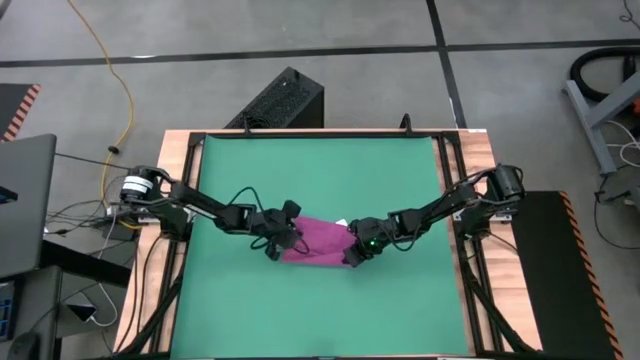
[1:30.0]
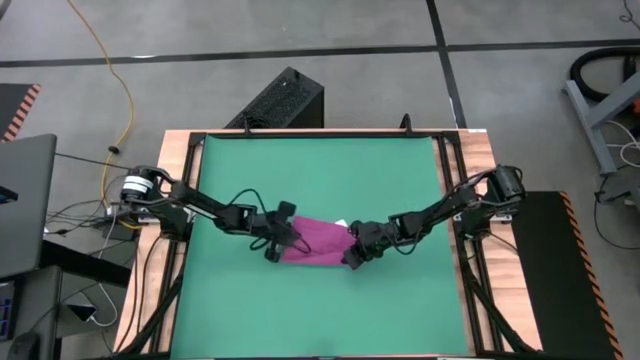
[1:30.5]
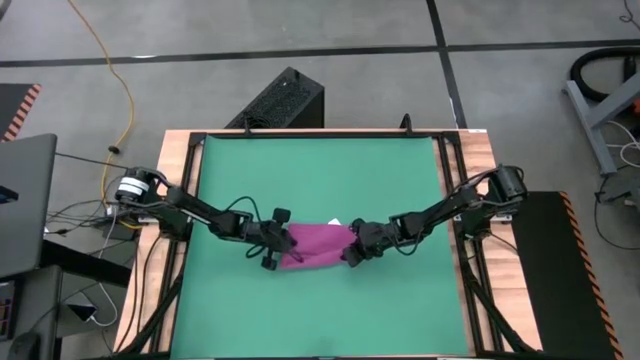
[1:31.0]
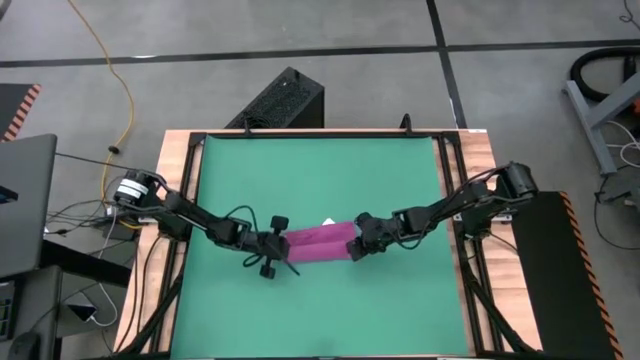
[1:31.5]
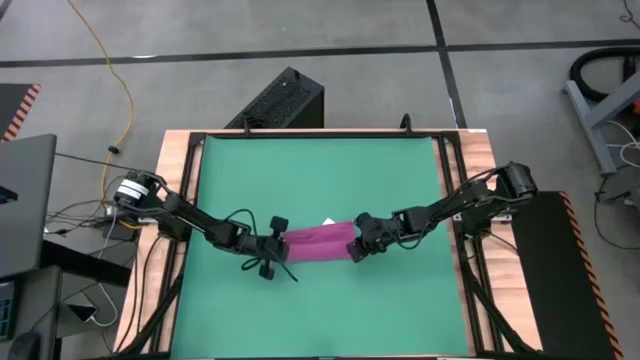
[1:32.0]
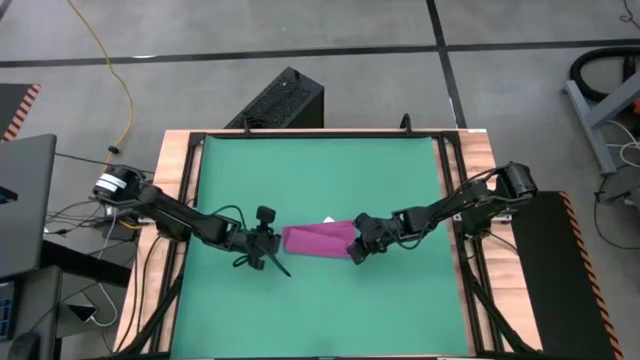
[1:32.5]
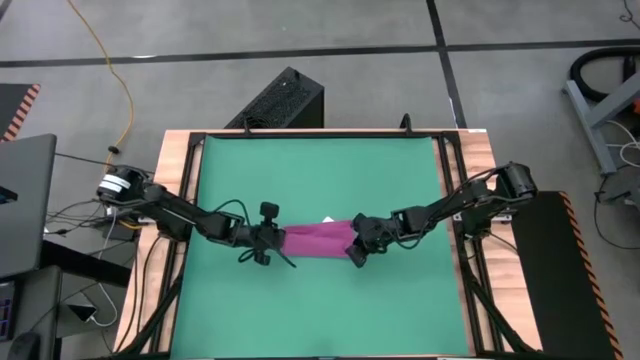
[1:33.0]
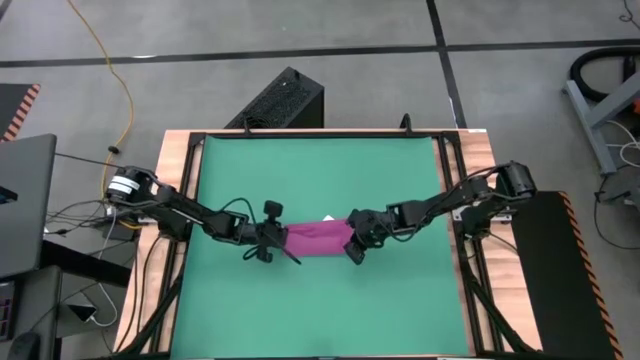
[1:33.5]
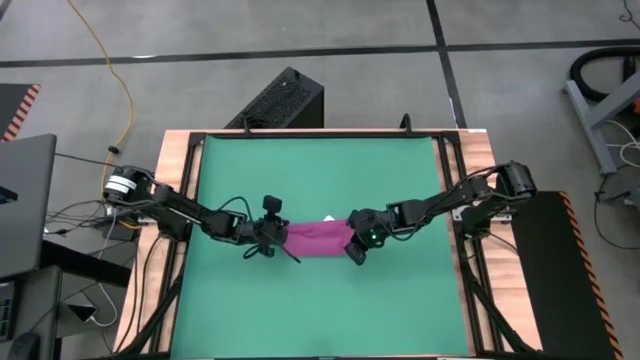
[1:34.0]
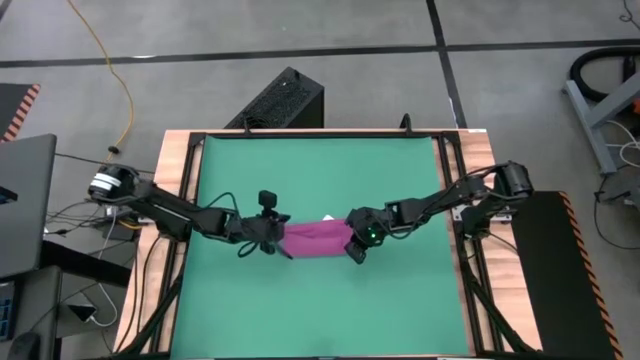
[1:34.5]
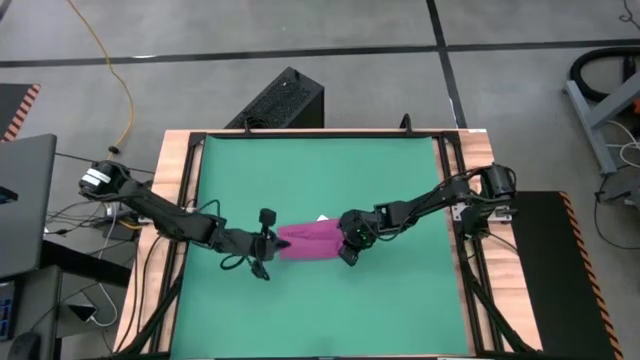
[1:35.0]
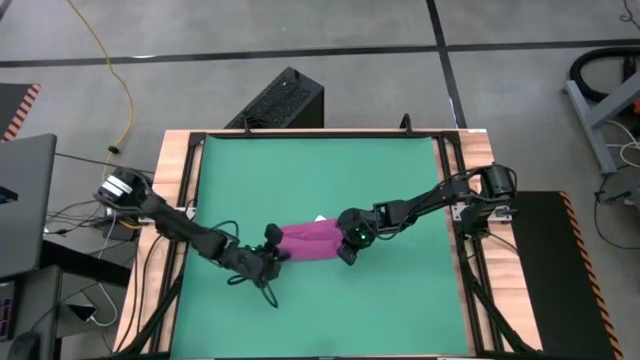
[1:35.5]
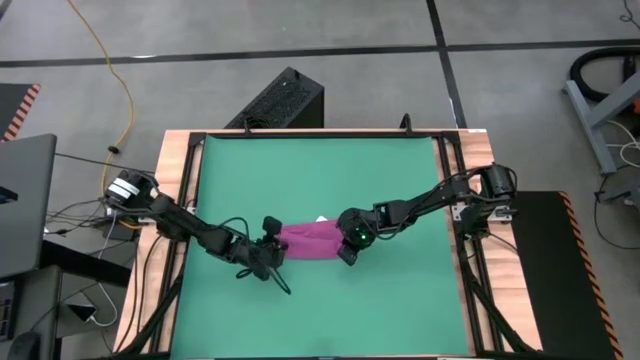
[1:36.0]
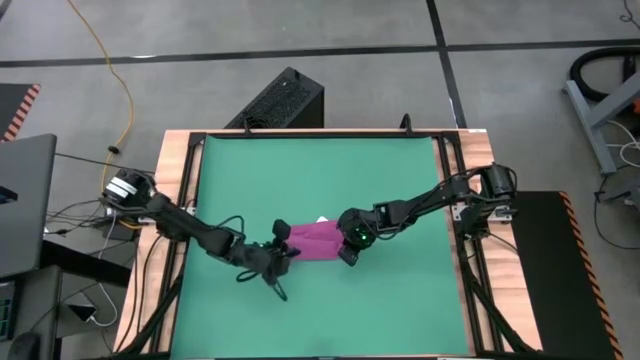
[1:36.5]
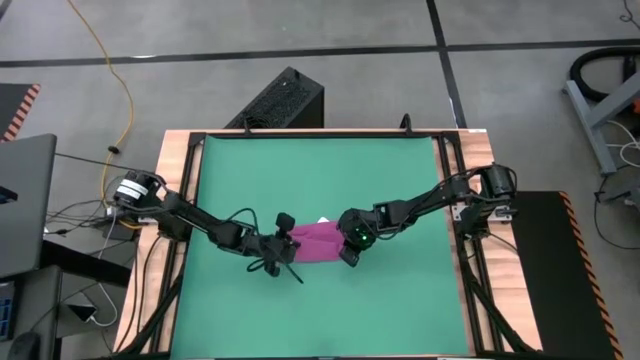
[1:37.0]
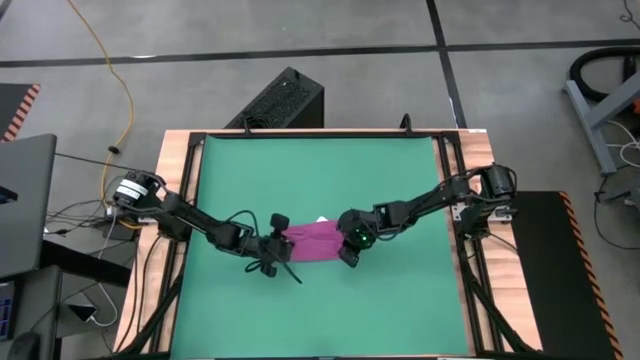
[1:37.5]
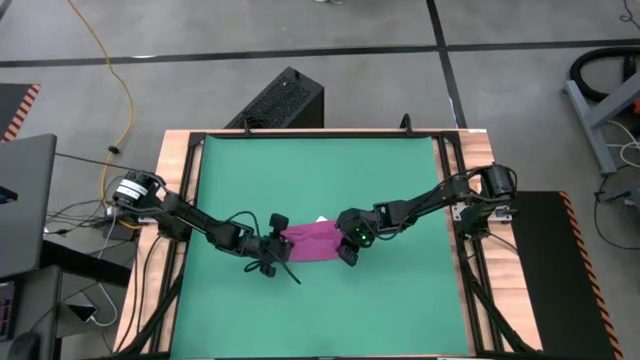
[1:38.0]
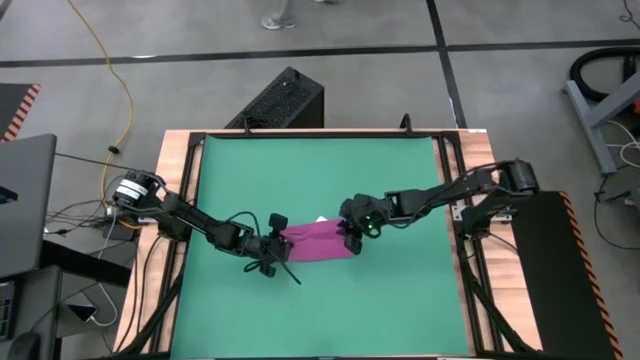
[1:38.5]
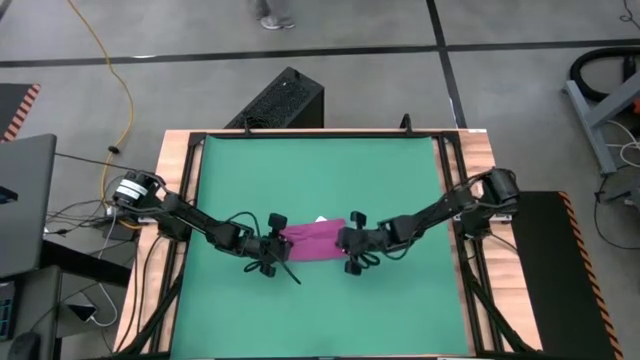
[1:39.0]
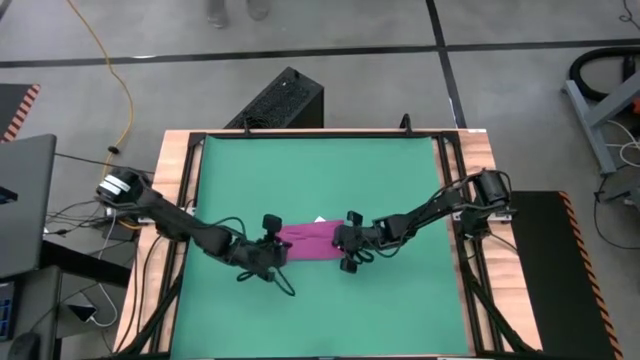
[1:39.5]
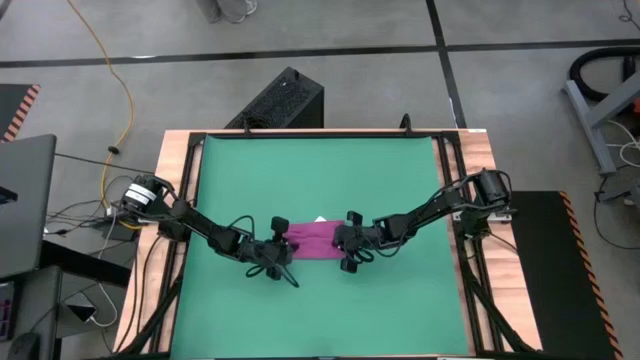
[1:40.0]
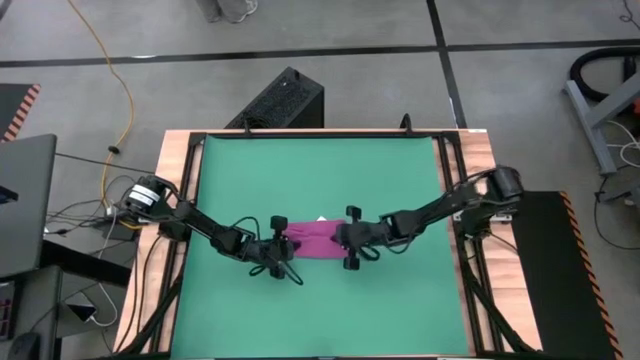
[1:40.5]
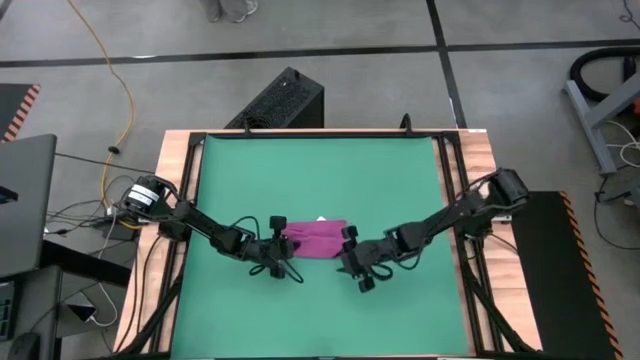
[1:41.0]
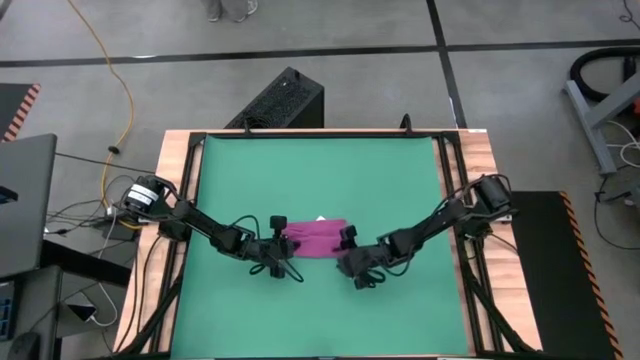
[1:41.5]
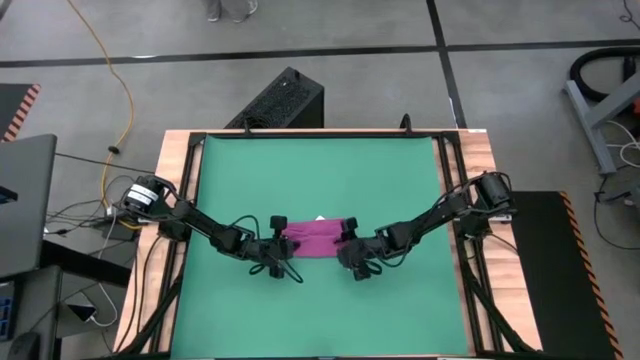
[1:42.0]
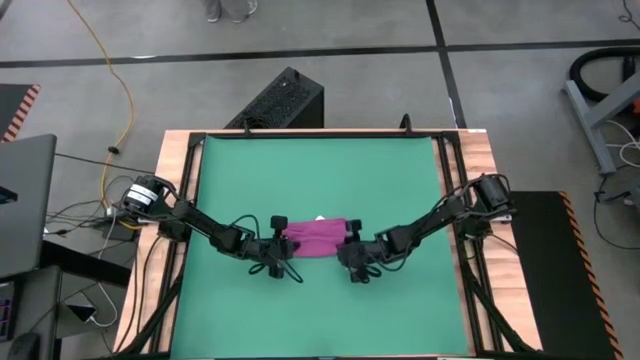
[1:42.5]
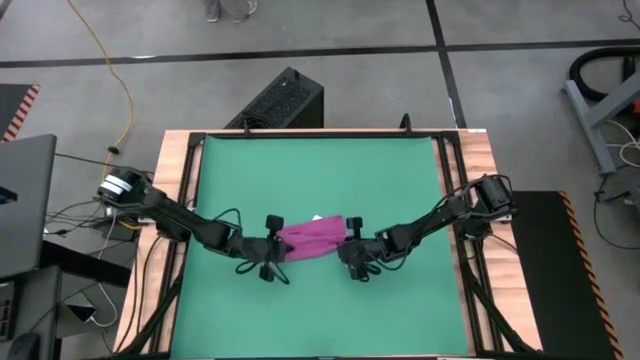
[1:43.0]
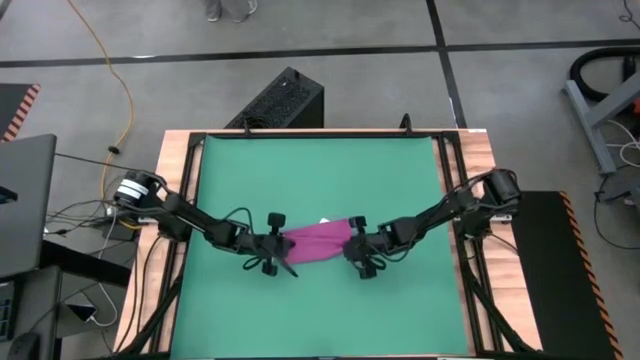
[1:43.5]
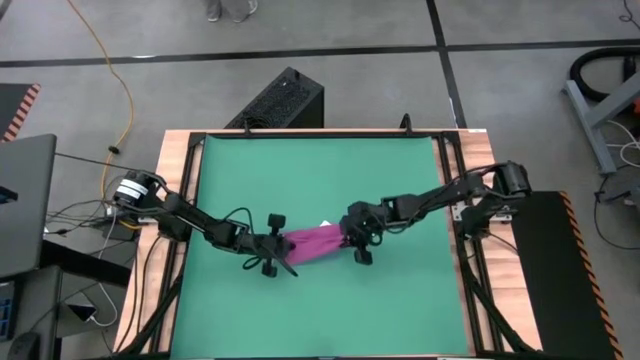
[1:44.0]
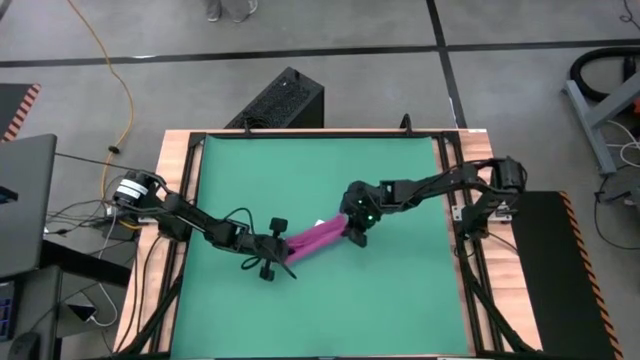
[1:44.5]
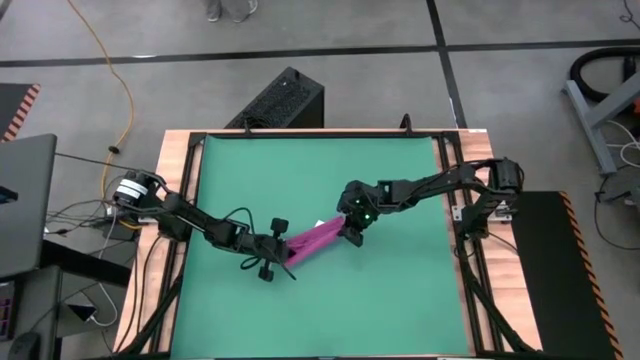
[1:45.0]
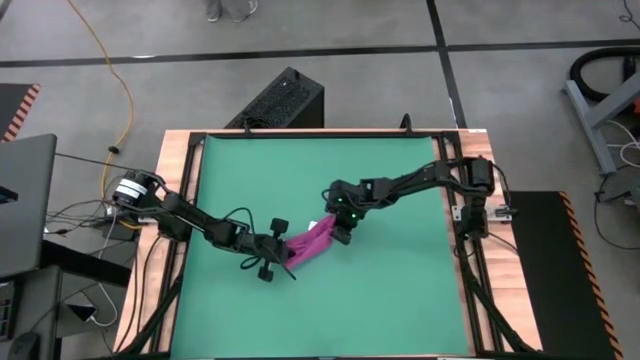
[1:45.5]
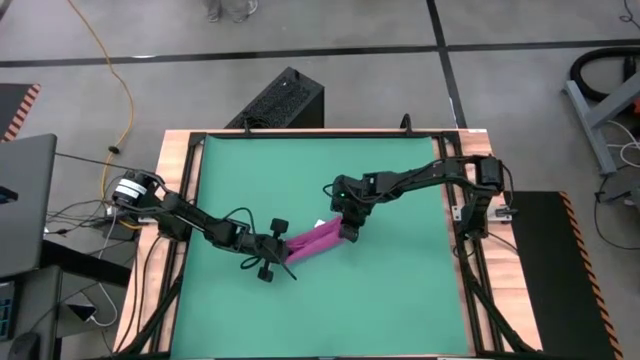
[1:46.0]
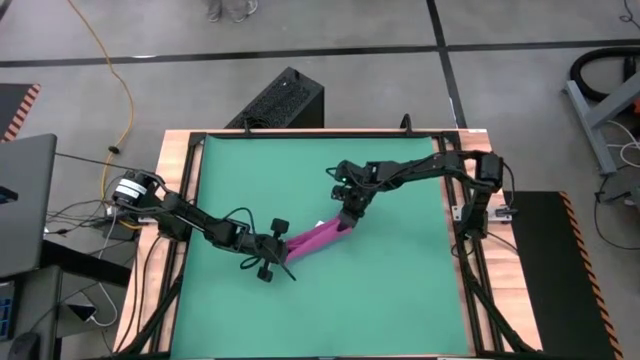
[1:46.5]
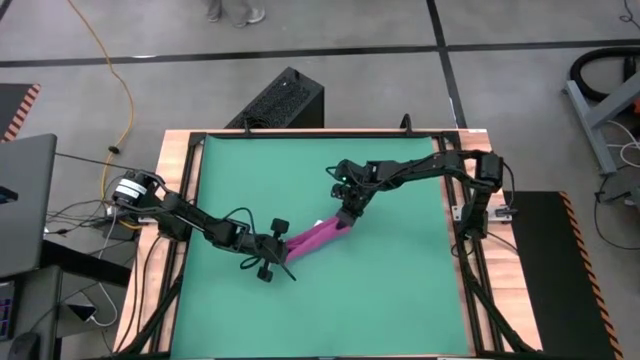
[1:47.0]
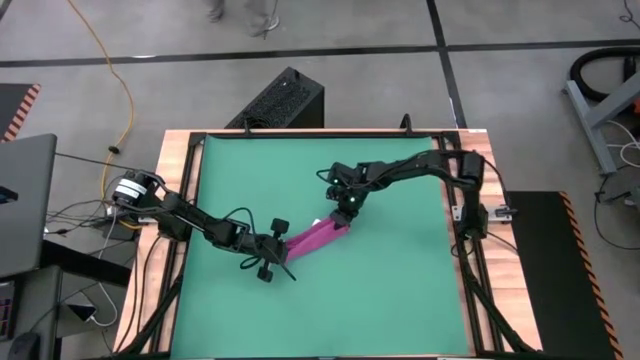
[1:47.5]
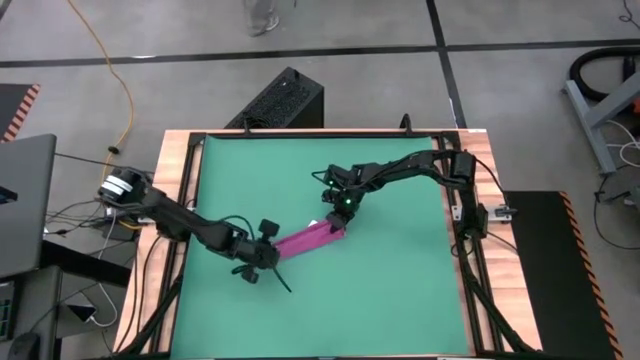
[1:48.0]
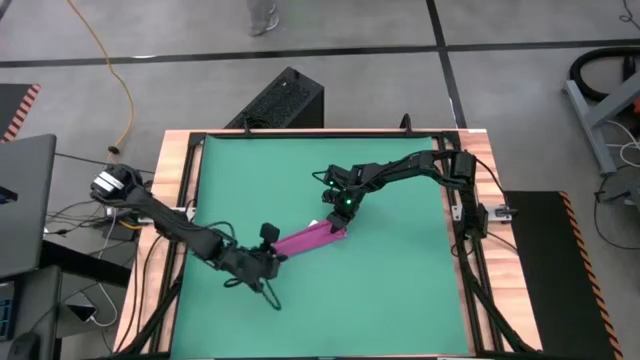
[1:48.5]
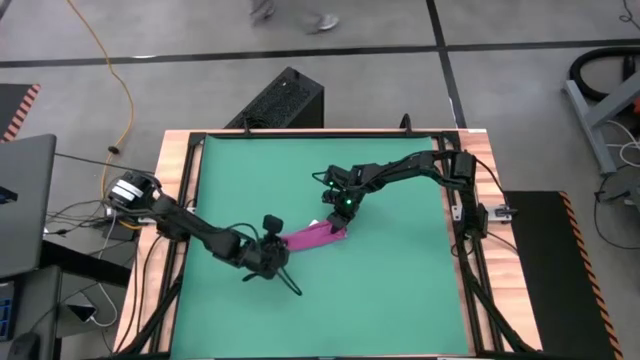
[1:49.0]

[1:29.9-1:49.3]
Task: Roll towel
Roll the violet towel
